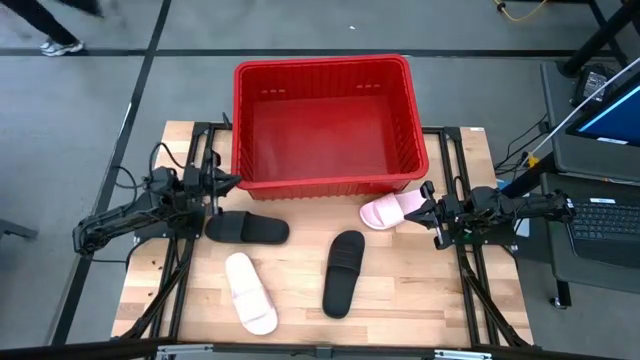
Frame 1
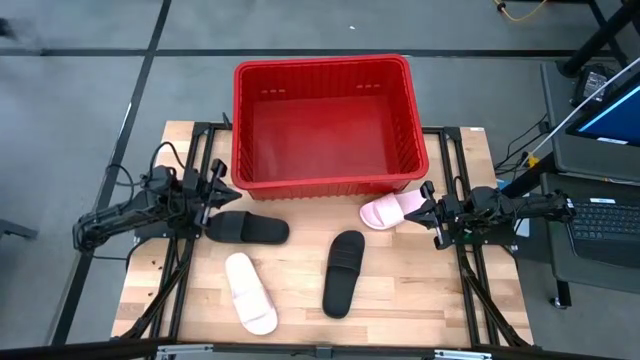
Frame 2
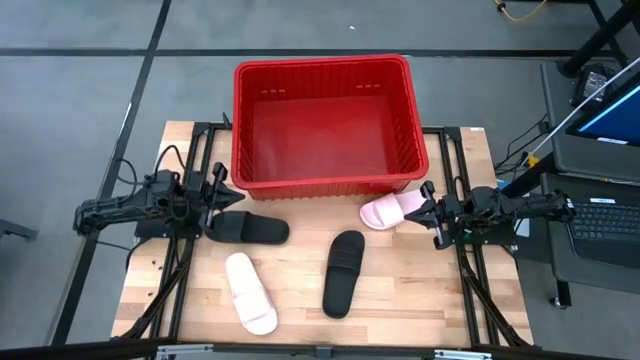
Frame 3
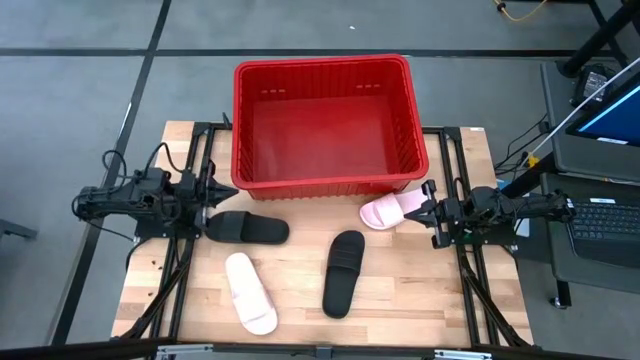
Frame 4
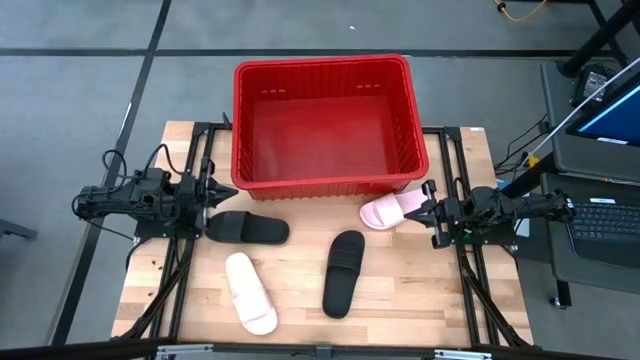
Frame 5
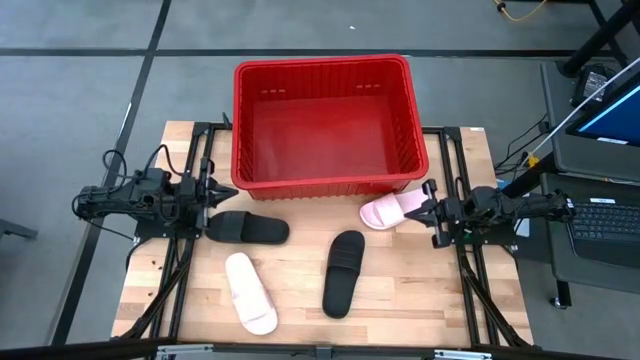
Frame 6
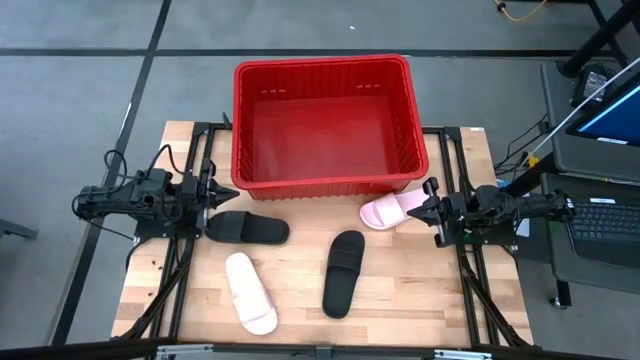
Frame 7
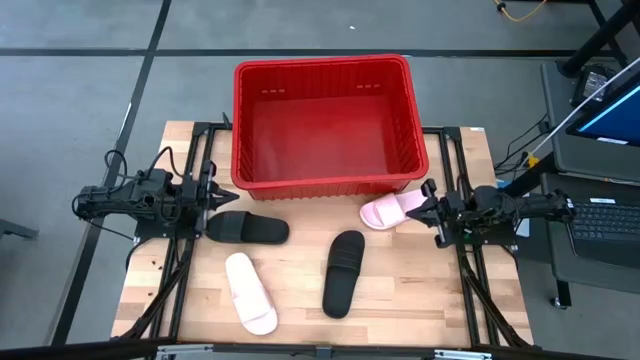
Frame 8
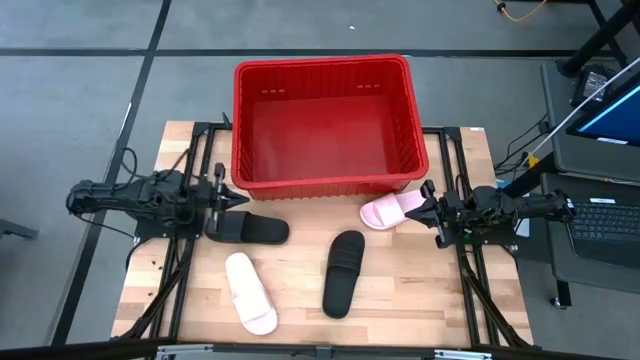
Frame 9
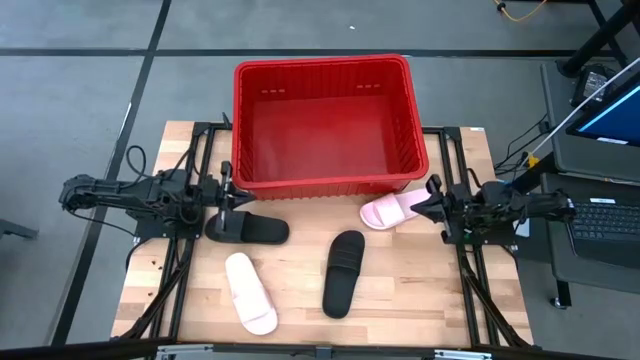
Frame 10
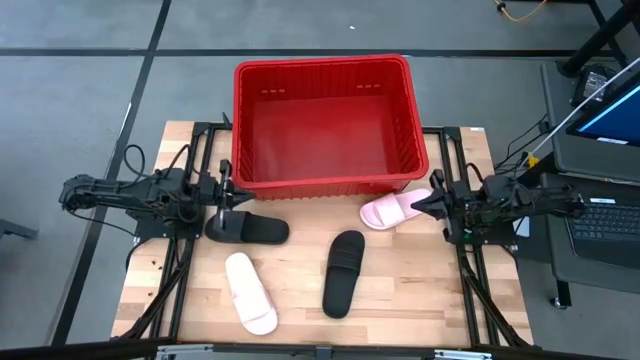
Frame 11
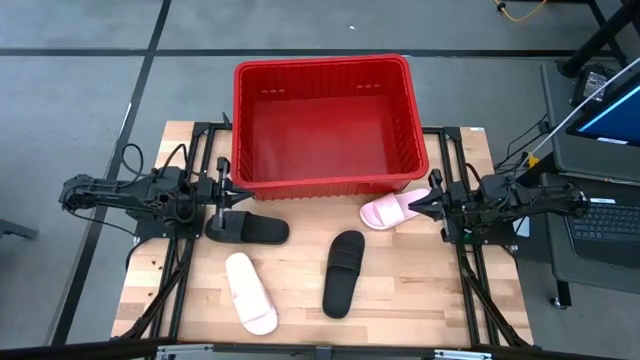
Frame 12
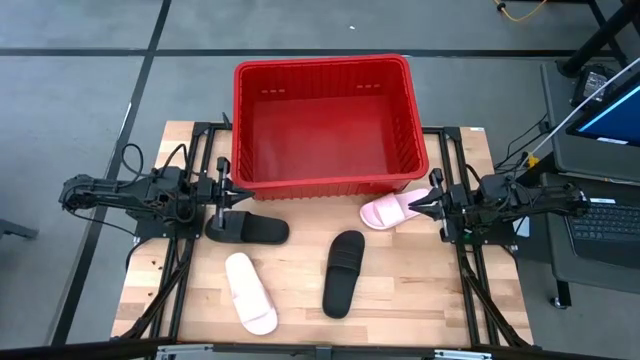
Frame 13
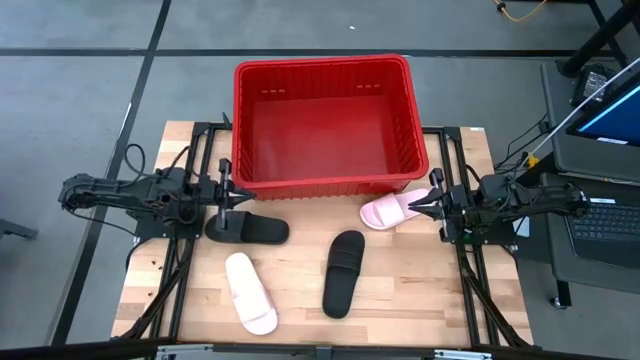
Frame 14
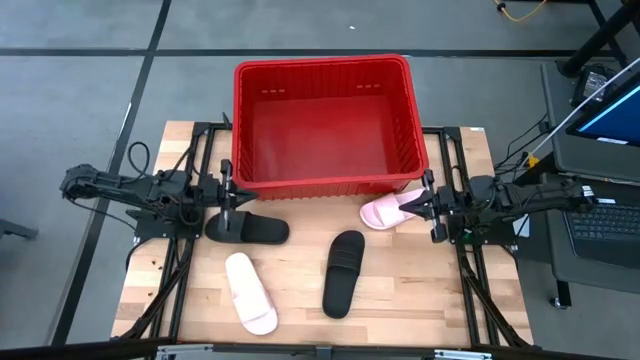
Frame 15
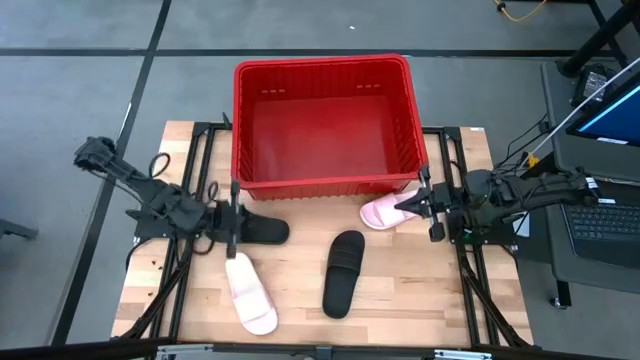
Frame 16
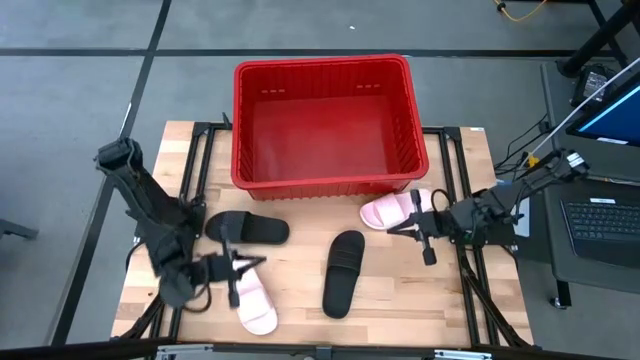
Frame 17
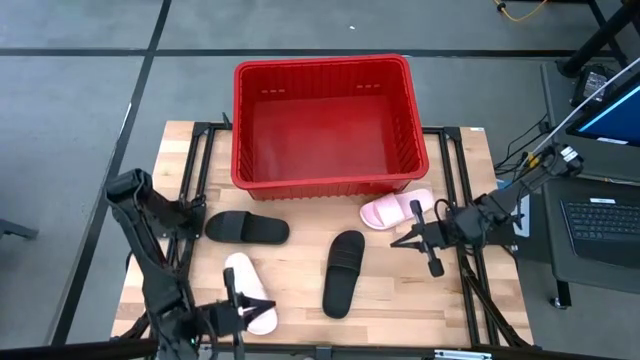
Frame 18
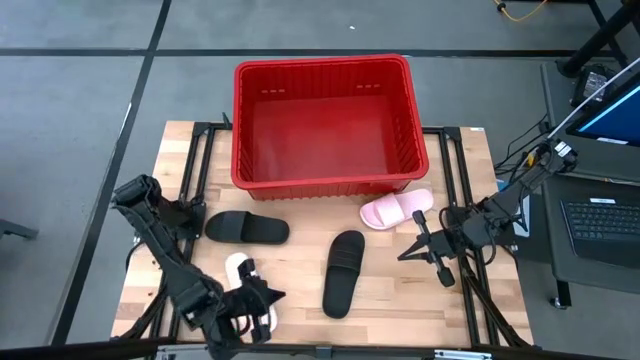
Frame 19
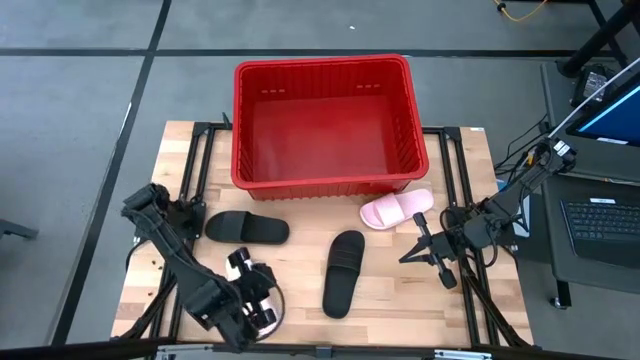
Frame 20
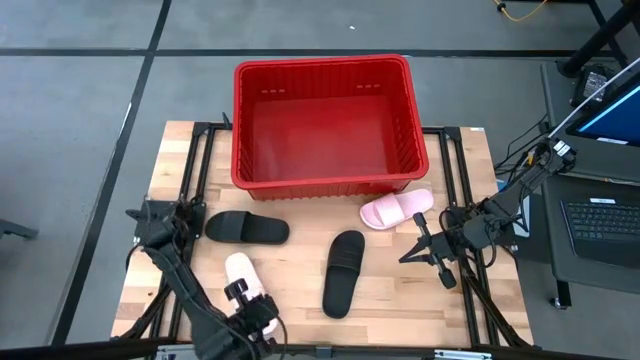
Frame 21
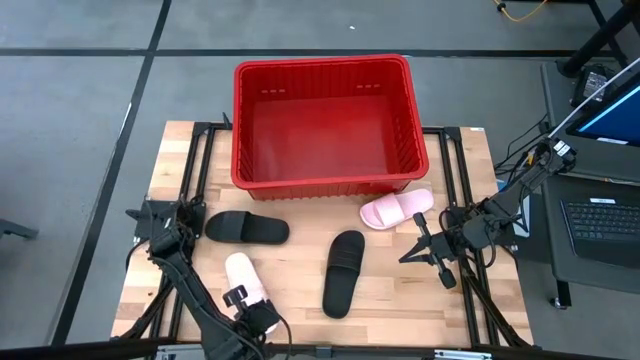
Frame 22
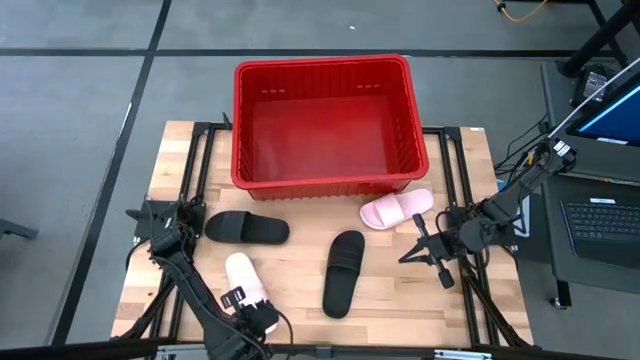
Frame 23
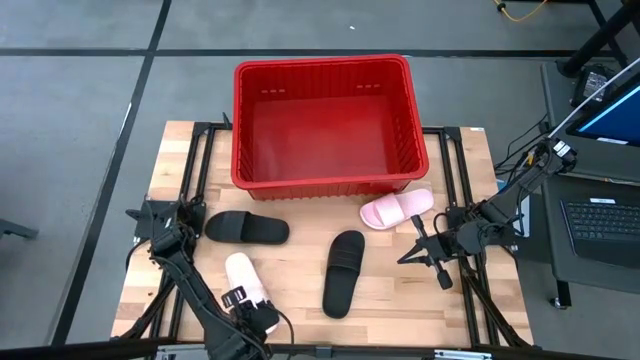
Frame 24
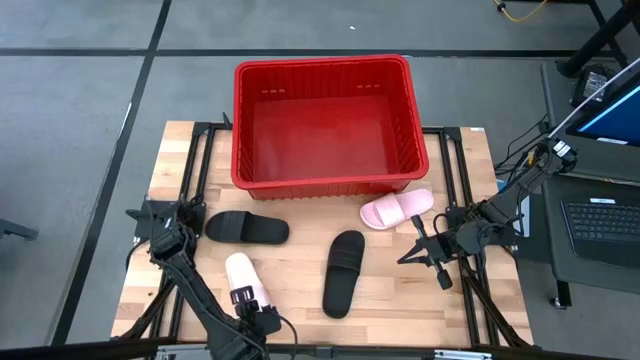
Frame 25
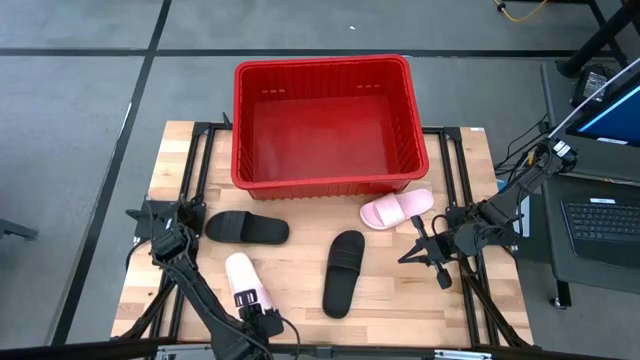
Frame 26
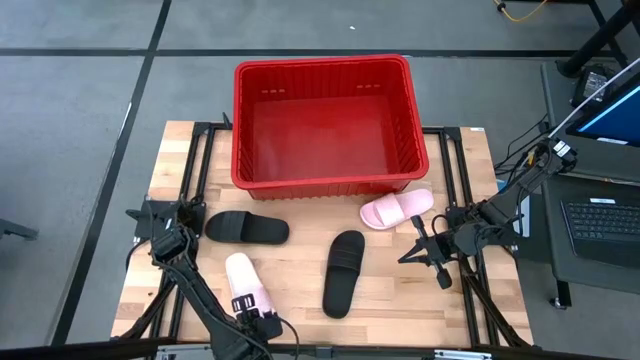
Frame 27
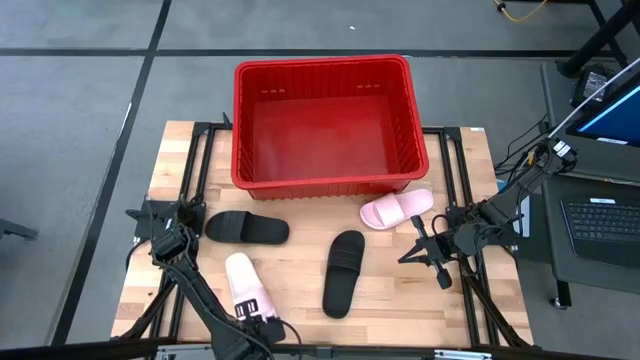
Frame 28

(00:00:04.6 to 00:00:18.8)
Task: Pick and place slides into bin
Put the top pink slide into the red bin

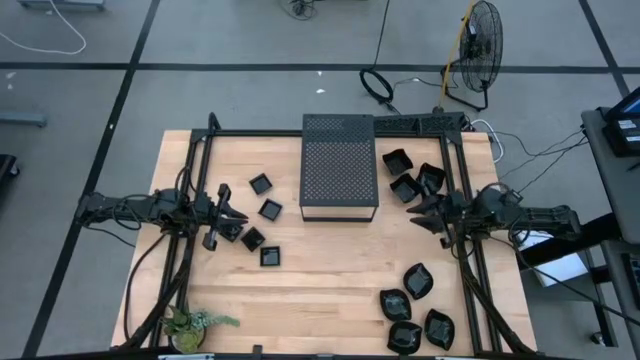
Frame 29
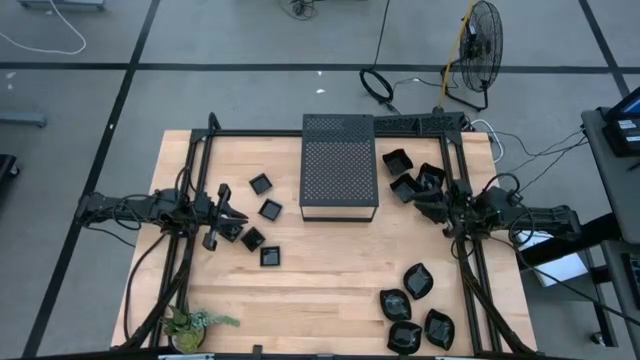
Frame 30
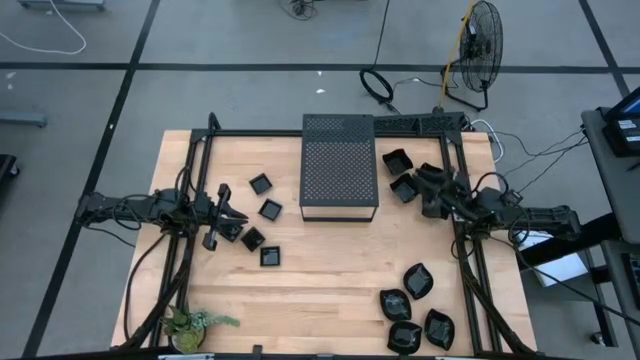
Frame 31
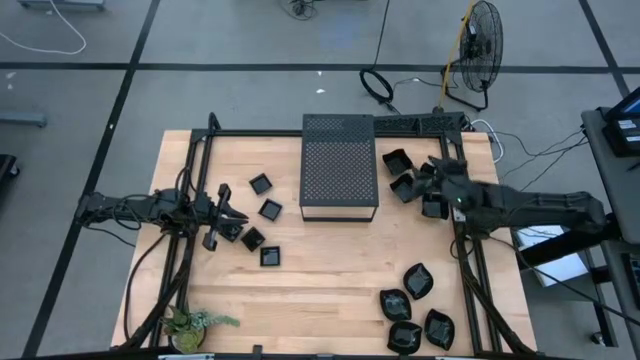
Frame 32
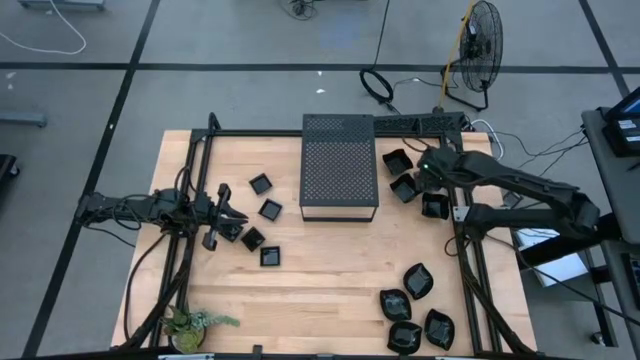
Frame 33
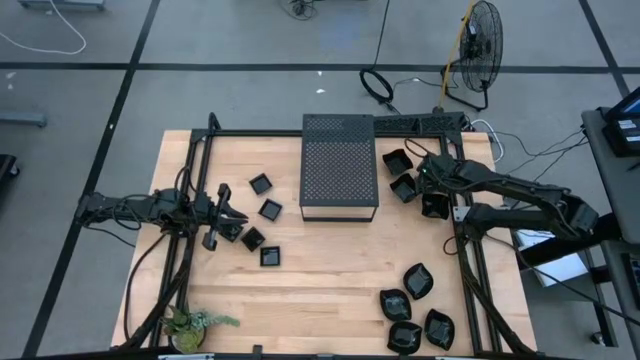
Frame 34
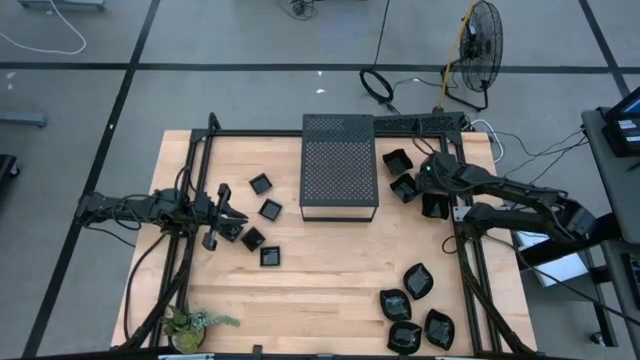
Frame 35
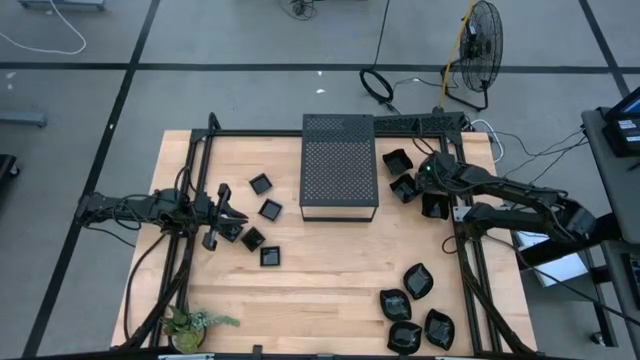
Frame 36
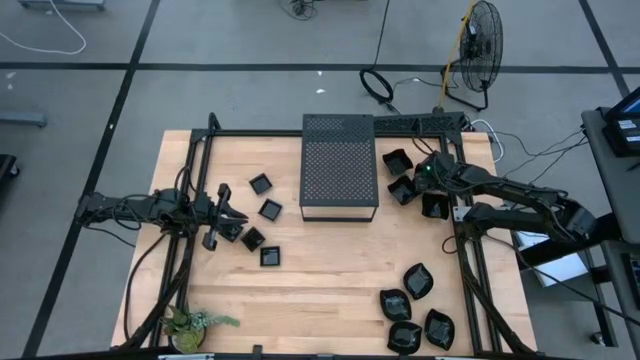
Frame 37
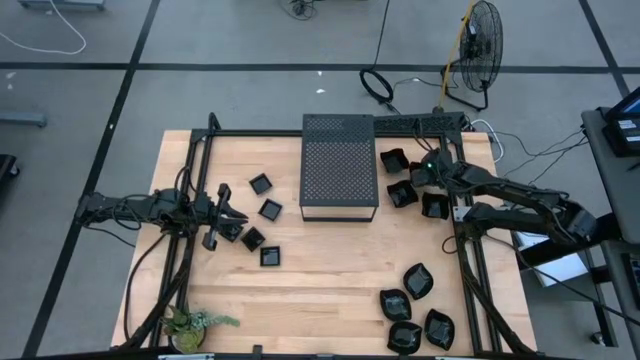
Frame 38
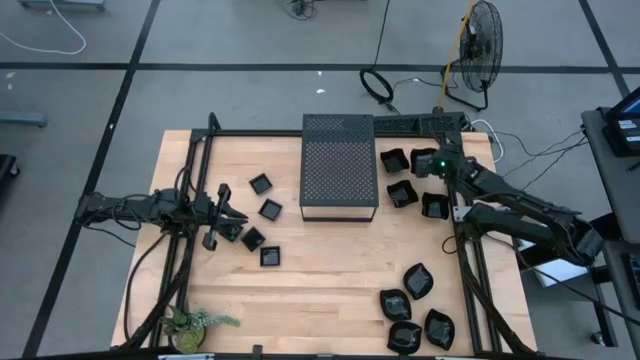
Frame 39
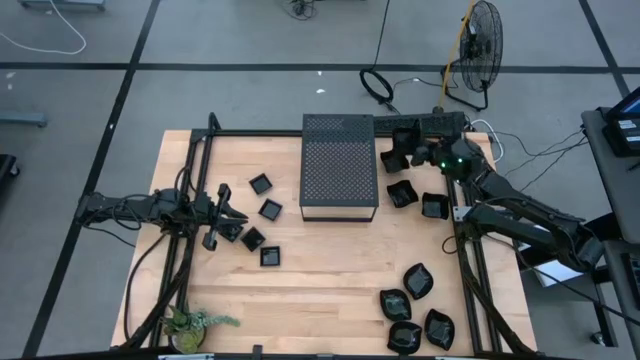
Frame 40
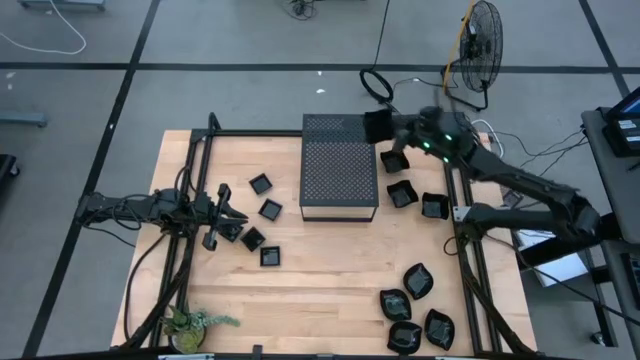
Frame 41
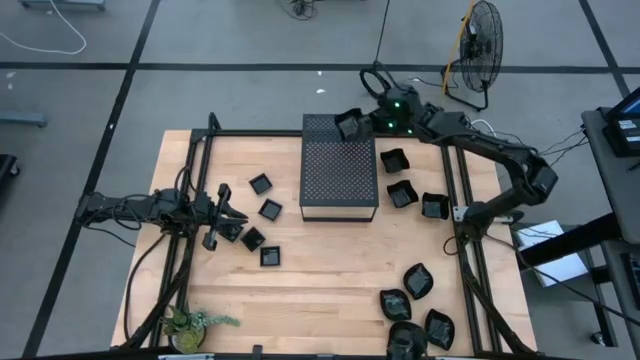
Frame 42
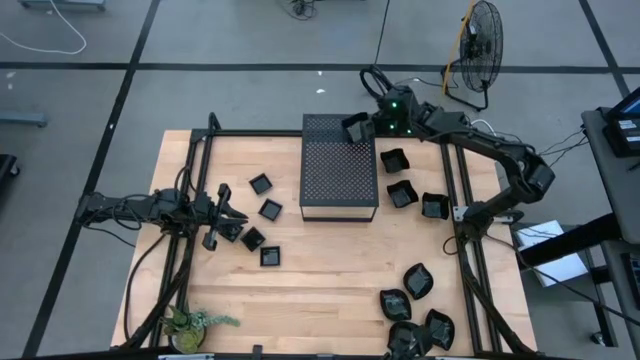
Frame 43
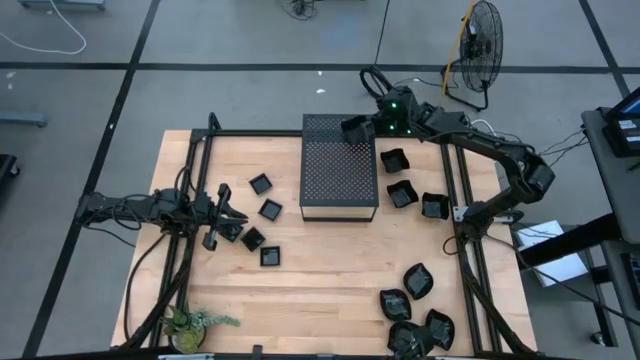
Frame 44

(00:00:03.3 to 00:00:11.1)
Task: Pick & Place Mini shaped plates
Put the distorted square plate on the shelf
